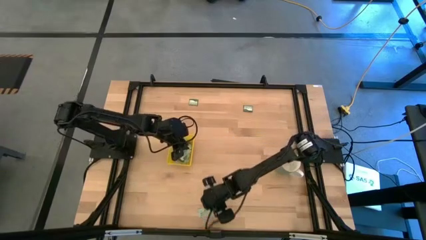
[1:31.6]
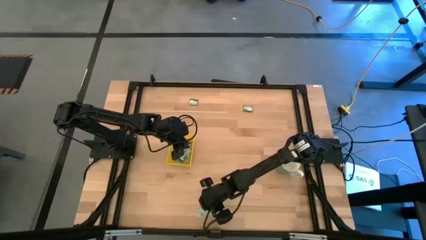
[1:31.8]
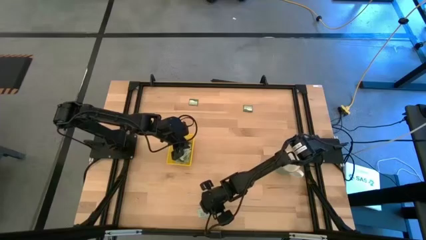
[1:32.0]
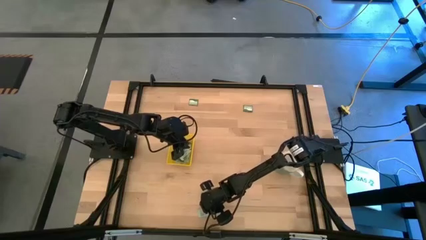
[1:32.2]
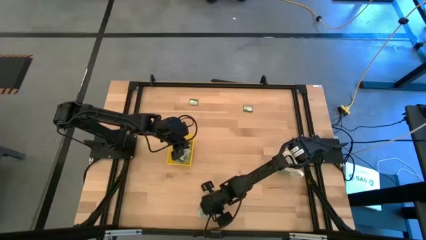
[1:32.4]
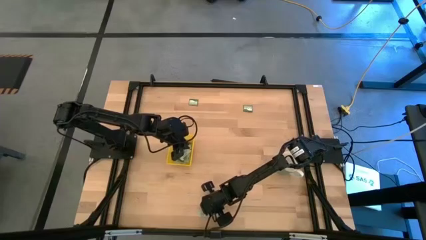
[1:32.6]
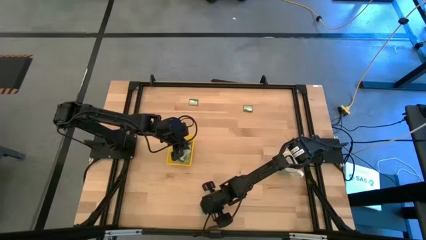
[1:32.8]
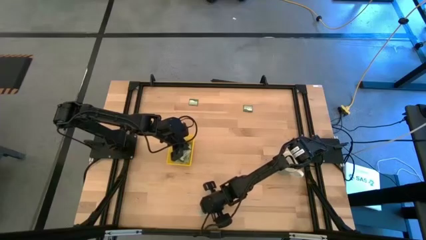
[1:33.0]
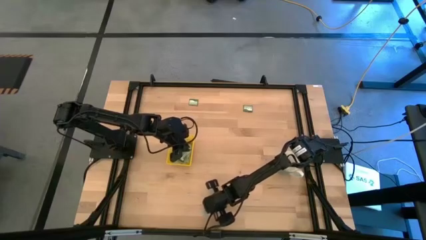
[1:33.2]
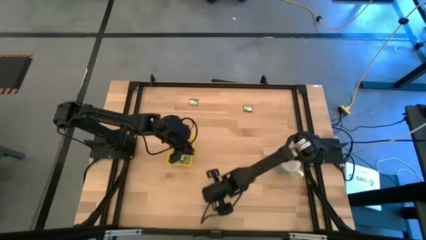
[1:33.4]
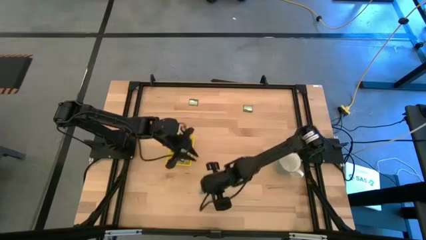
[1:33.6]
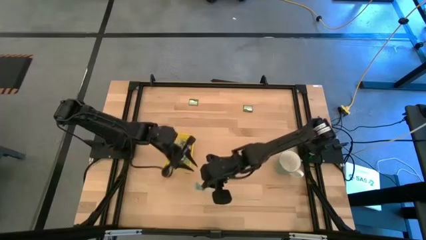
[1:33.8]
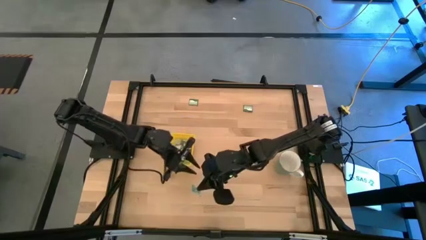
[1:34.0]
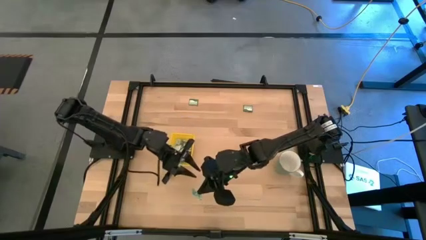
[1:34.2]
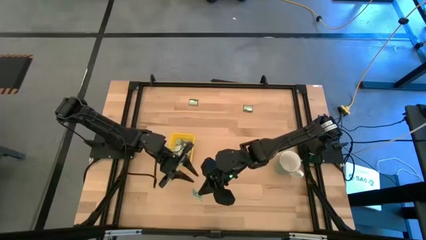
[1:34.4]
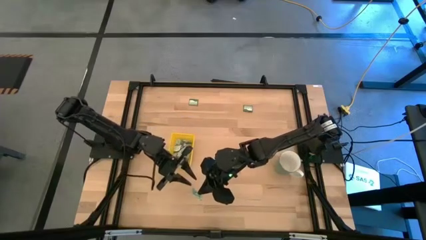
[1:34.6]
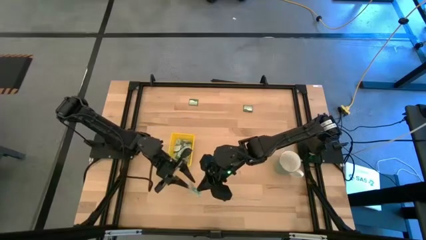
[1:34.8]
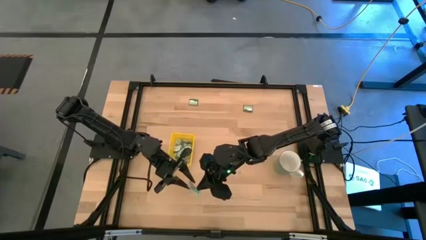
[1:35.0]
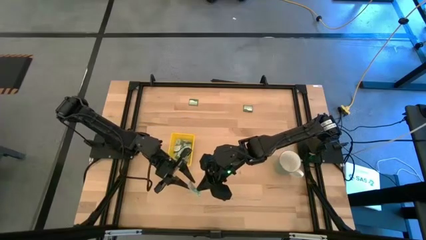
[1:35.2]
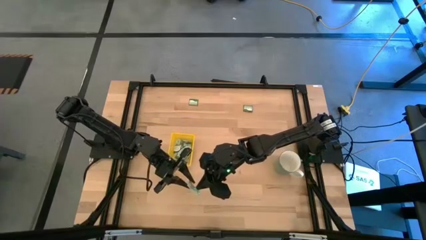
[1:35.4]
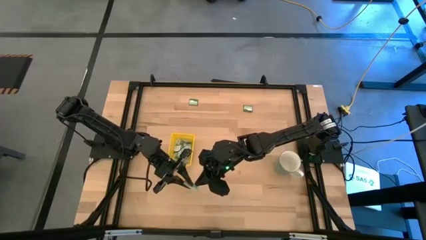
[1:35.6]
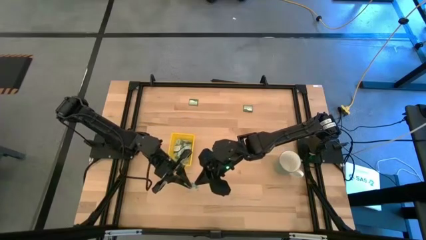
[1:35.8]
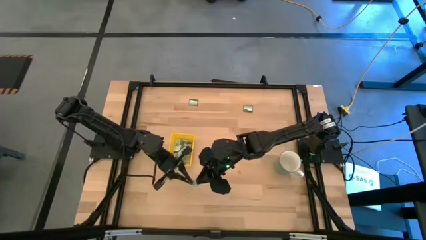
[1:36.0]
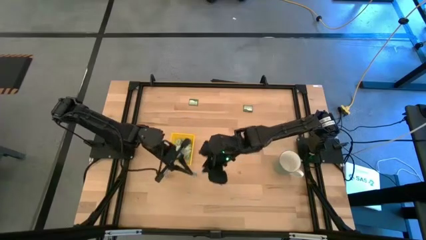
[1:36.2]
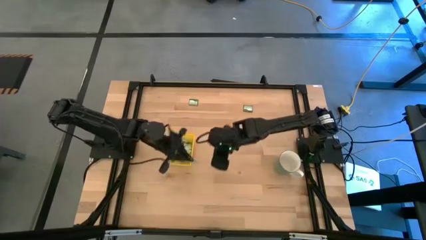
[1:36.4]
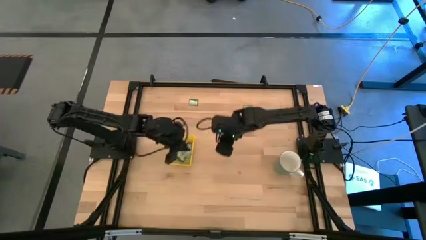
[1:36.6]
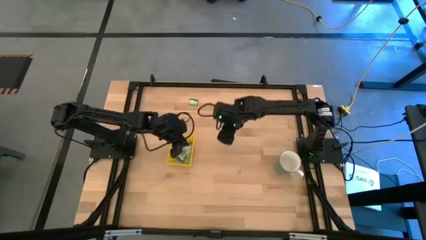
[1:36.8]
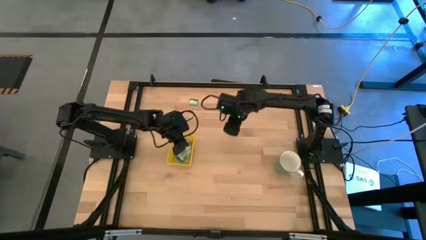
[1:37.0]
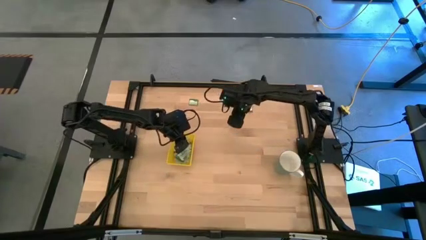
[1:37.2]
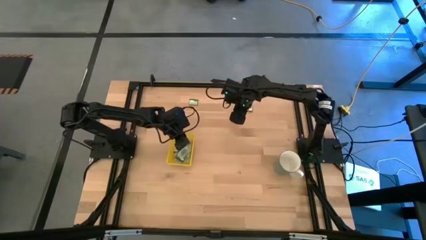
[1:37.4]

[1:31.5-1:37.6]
Task: Pick and place Stevia / Truvia into bins
Put the green packet into the yellow bin

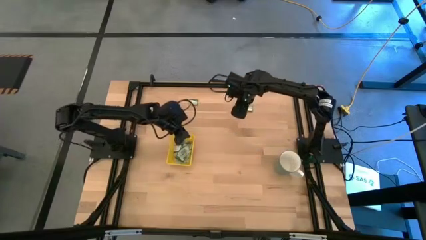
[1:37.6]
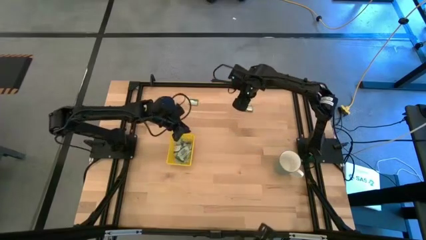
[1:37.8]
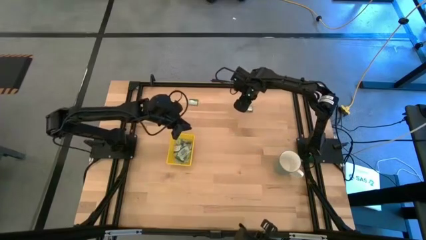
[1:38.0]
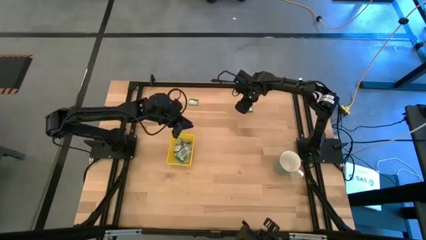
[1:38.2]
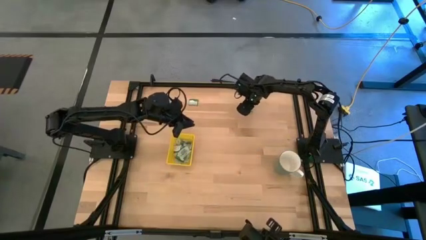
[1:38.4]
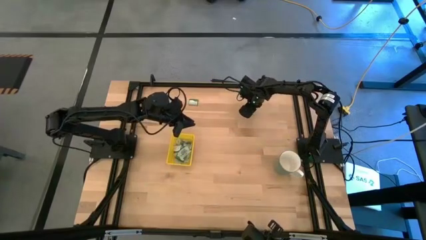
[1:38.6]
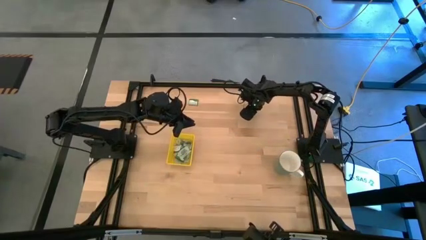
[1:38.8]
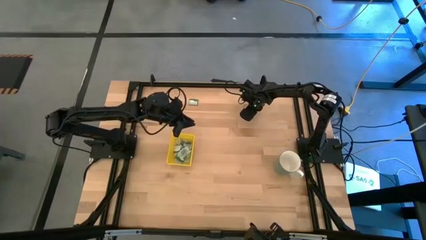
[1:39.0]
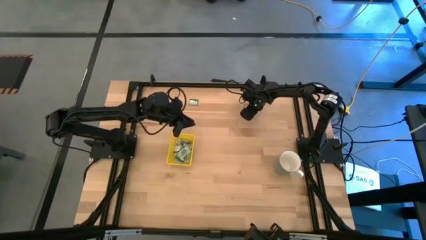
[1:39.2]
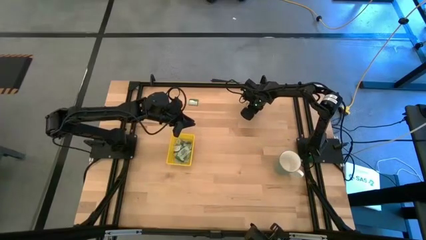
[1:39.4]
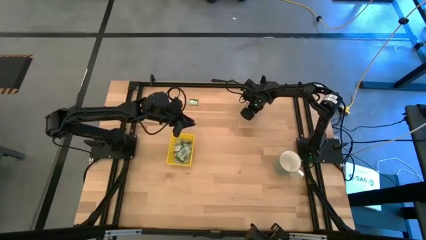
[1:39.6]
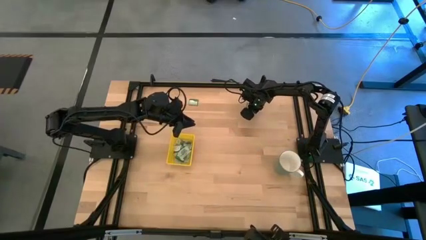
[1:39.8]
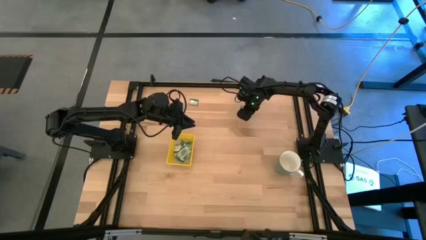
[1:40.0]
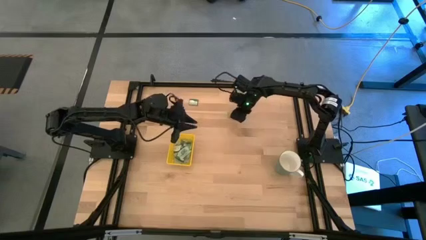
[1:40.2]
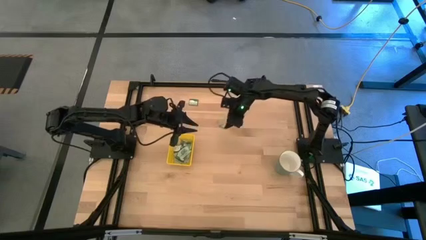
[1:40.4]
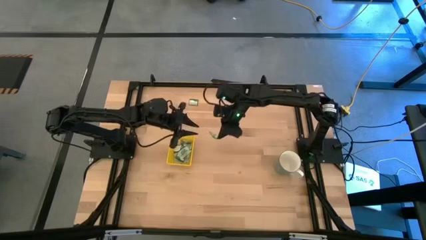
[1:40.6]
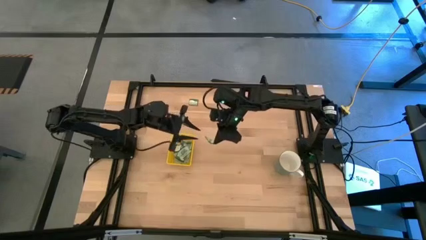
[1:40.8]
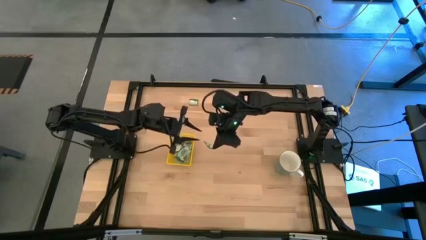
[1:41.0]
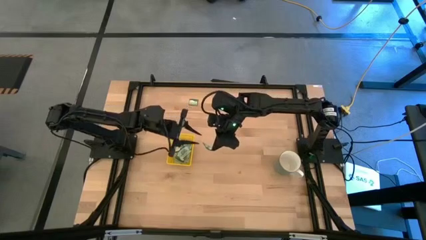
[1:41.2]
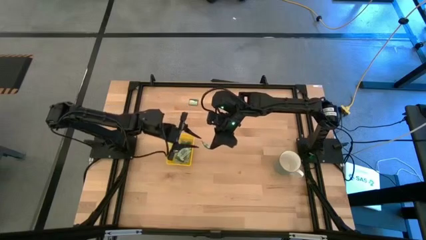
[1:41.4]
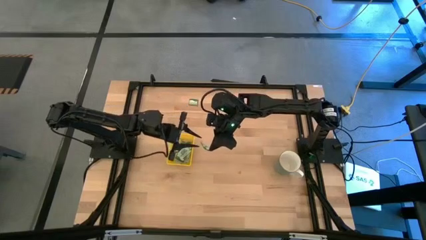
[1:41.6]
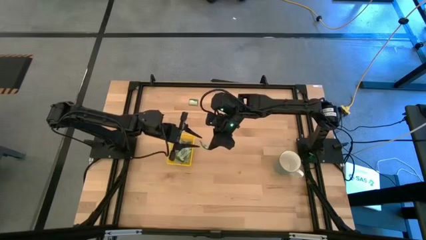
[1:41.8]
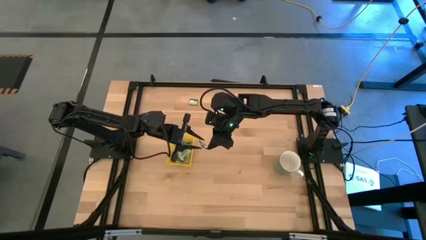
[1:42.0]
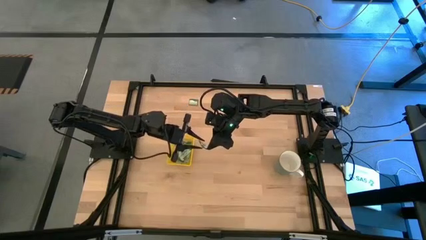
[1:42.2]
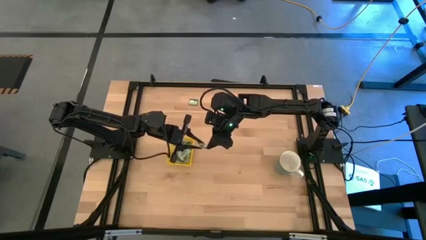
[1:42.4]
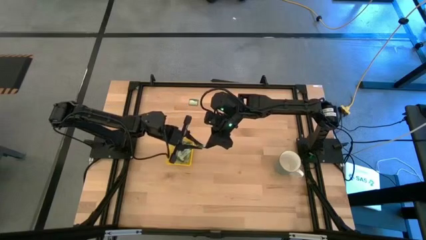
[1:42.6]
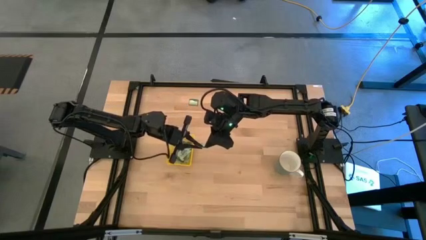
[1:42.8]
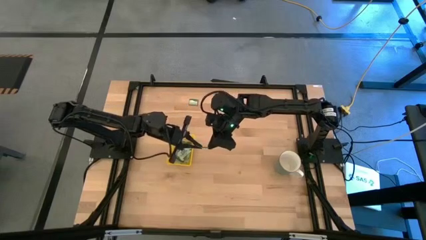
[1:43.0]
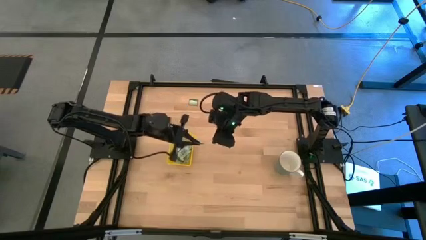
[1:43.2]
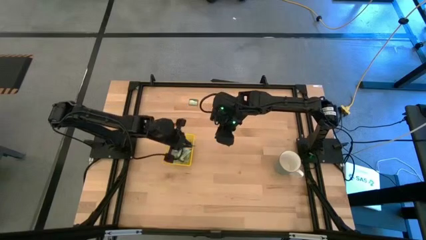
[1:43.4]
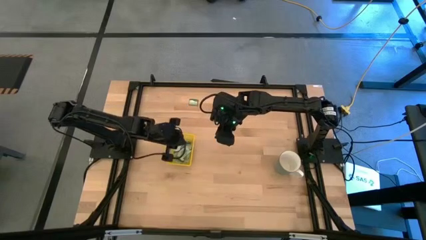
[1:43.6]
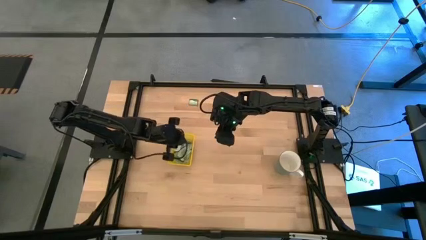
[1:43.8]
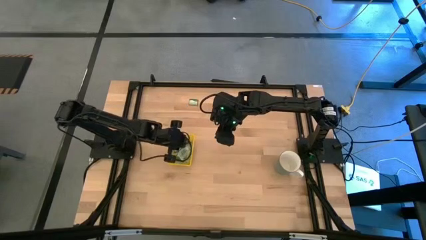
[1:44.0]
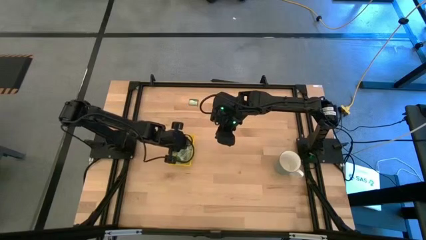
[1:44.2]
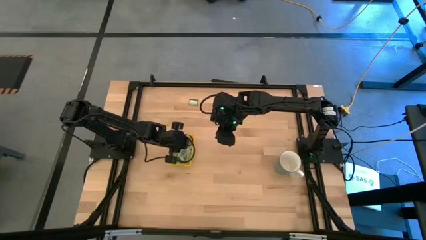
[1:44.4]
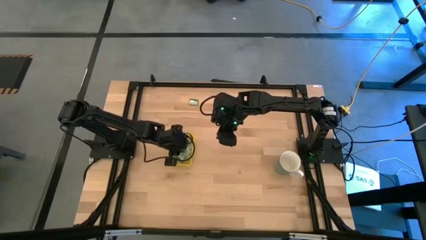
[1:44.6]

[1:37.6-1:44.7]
Put the green packet into the yellow bin

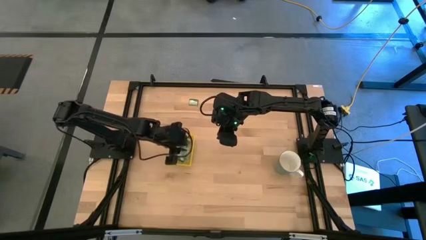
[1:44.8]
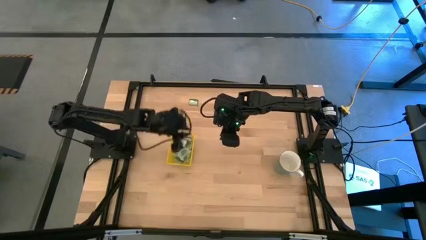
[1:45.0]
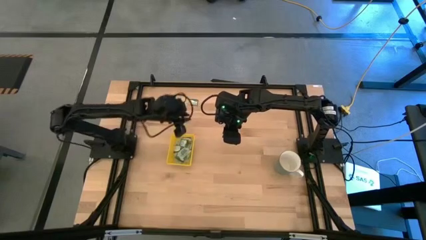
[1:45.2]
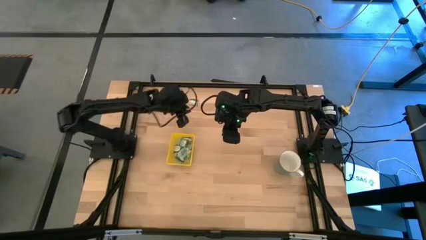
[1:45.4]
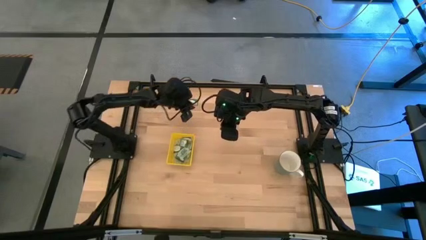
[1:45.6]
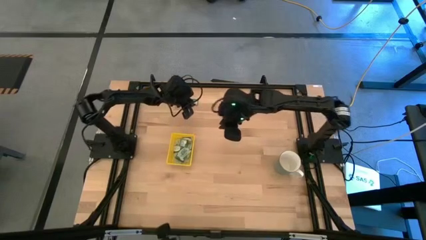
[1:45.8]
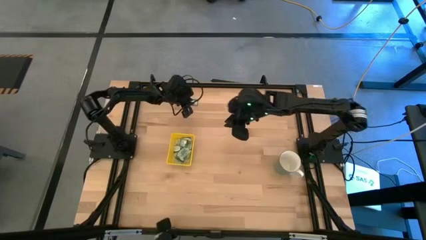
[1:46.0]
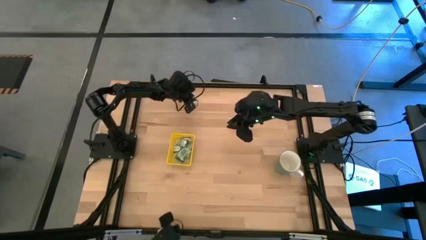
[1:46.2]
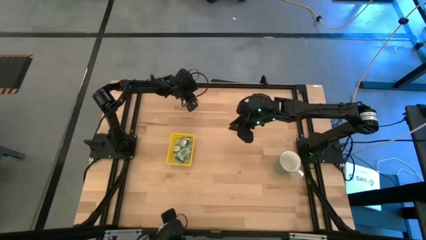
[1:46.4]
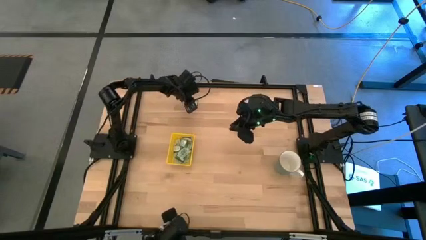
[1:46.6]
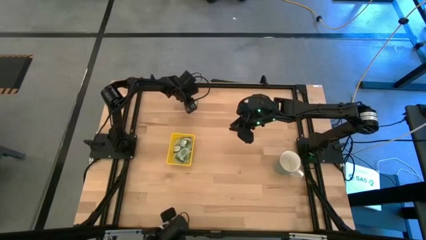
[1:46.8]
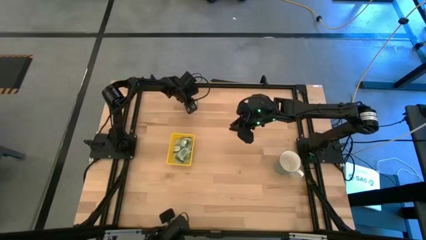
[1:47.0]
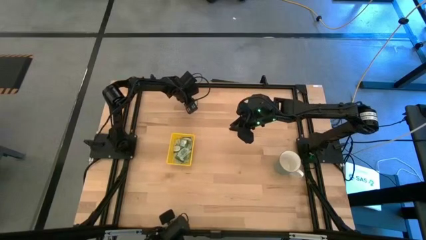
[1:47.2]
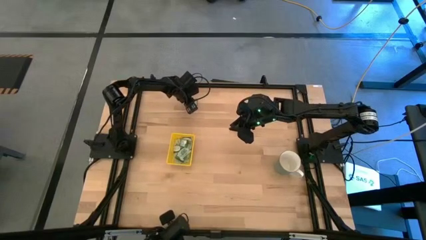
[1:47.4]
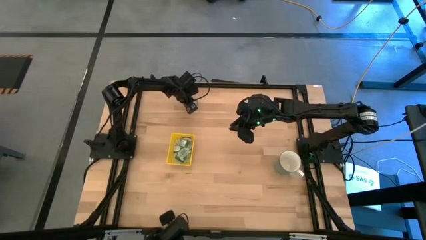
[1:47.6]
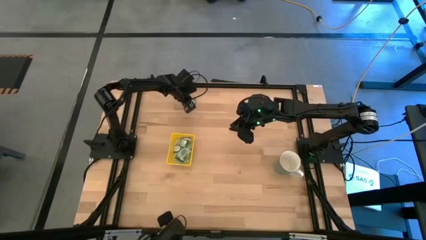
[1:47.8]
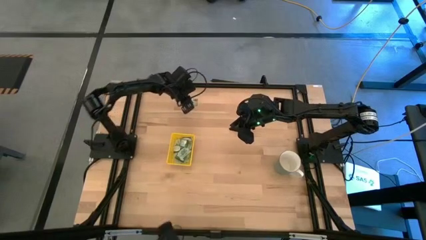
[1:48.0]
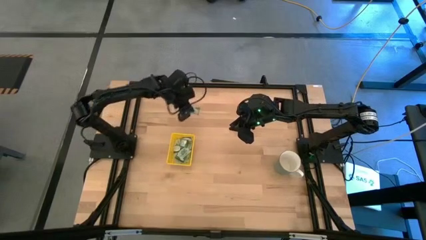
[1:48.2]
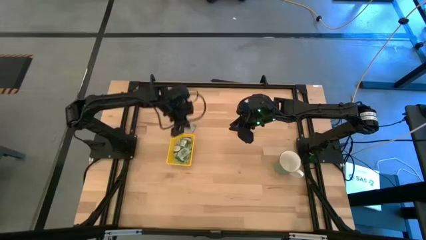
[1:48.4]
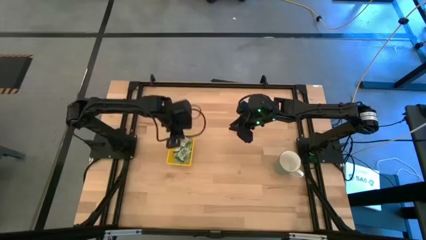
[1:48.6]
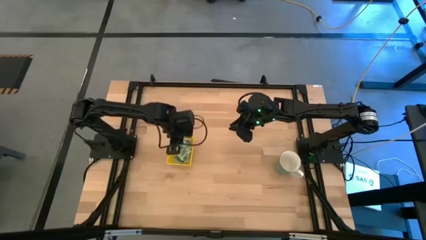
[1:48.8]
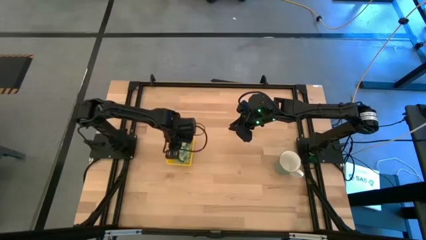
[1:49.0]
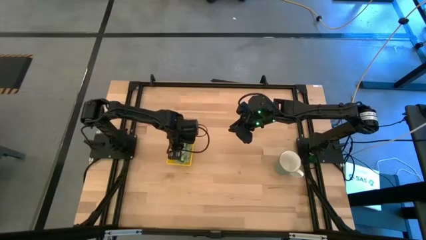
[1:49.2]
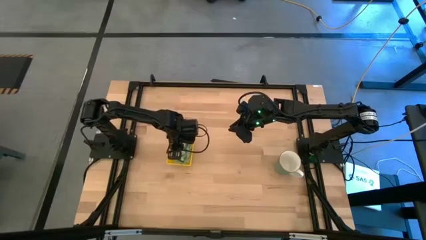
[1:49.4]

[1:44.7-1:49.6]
Put the green packet into the yellow bin
